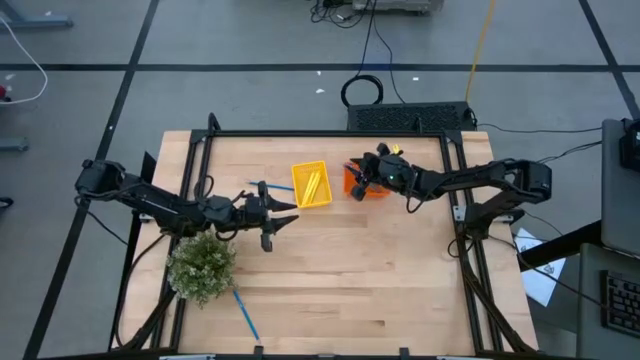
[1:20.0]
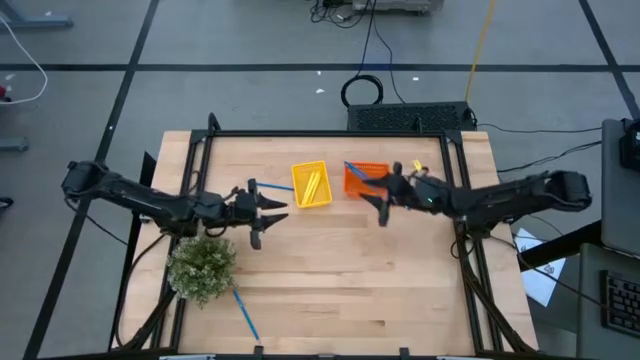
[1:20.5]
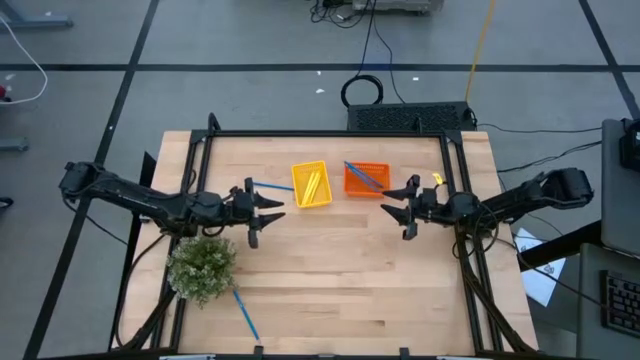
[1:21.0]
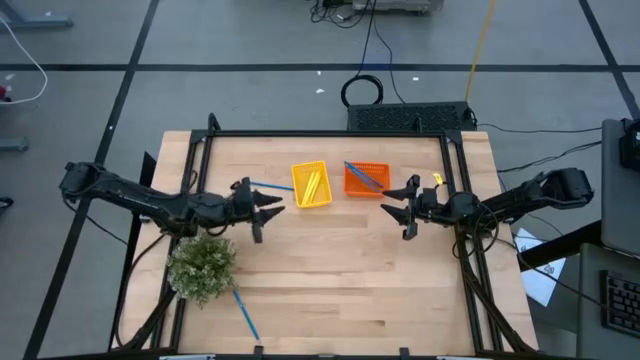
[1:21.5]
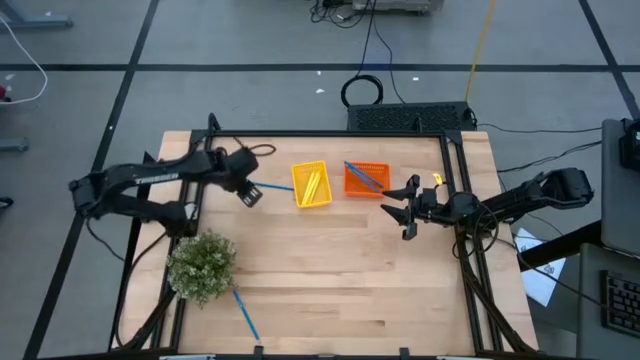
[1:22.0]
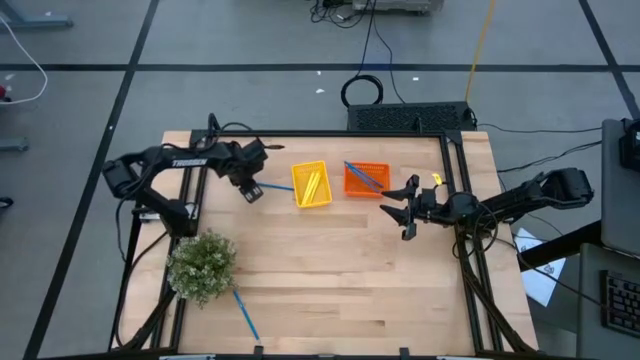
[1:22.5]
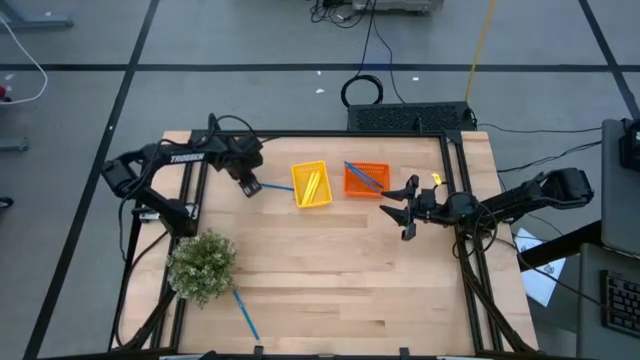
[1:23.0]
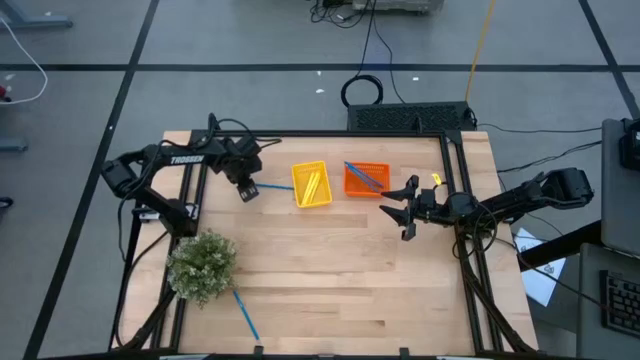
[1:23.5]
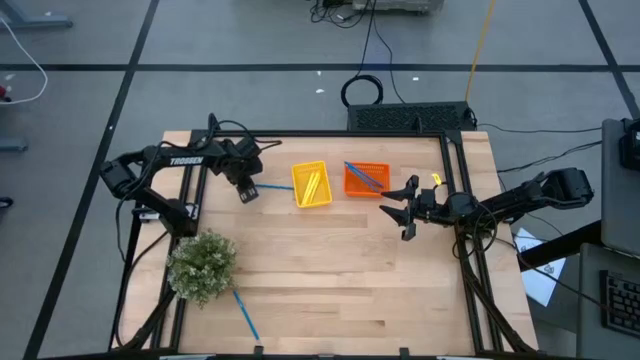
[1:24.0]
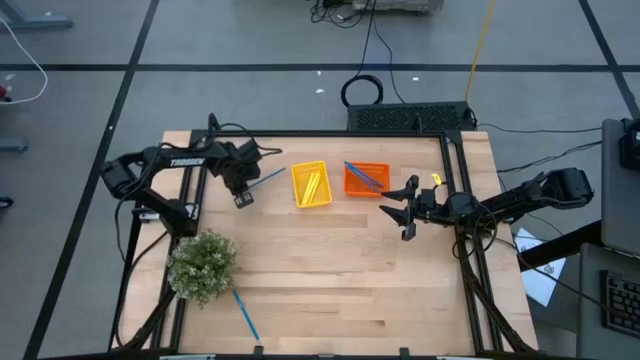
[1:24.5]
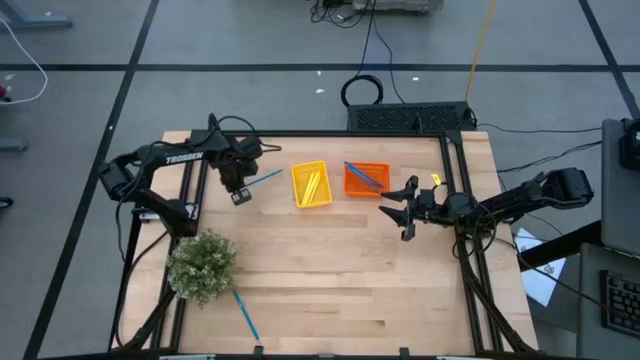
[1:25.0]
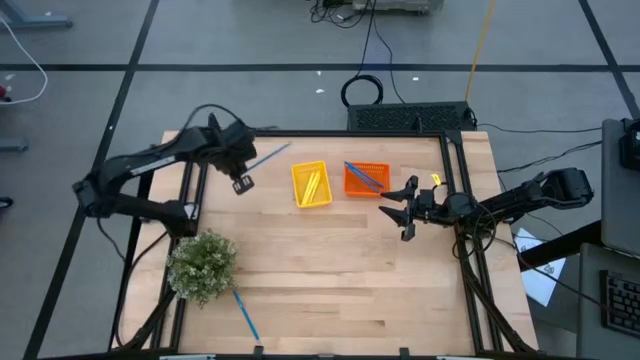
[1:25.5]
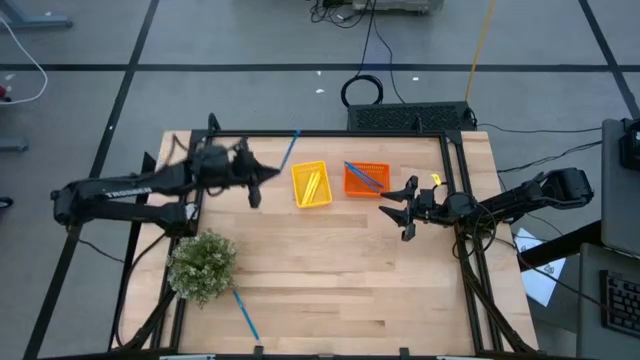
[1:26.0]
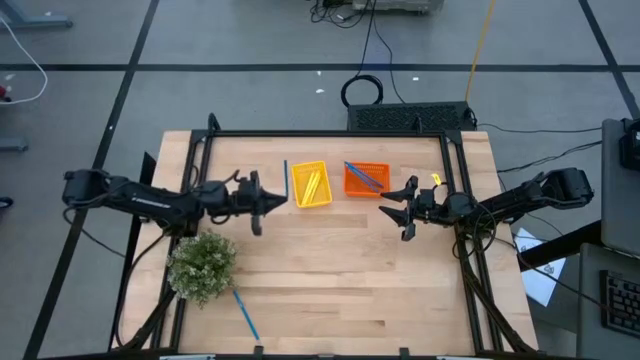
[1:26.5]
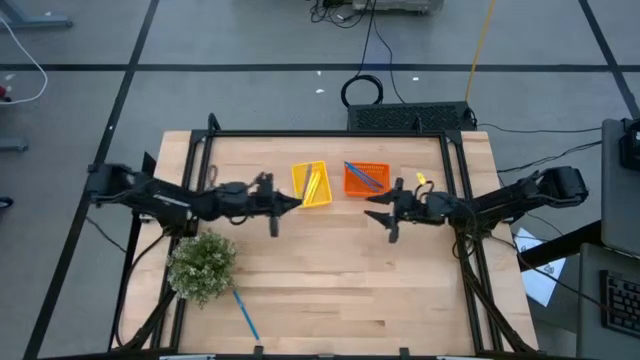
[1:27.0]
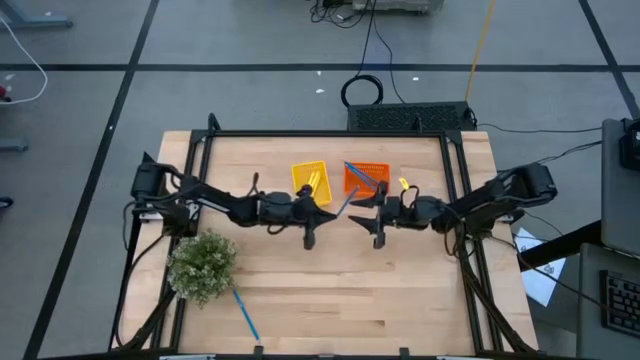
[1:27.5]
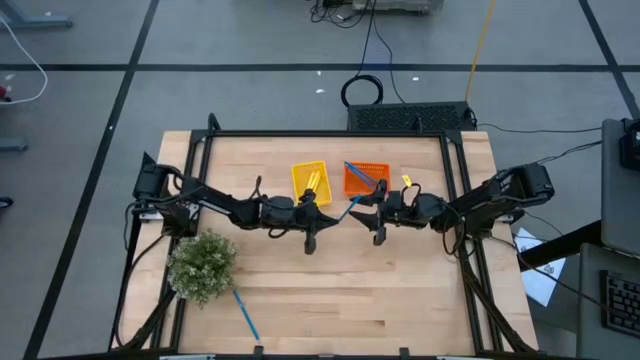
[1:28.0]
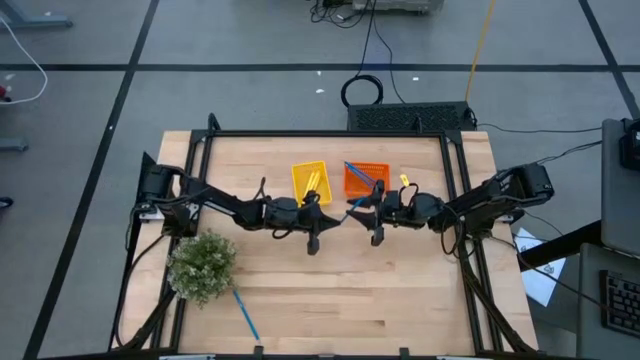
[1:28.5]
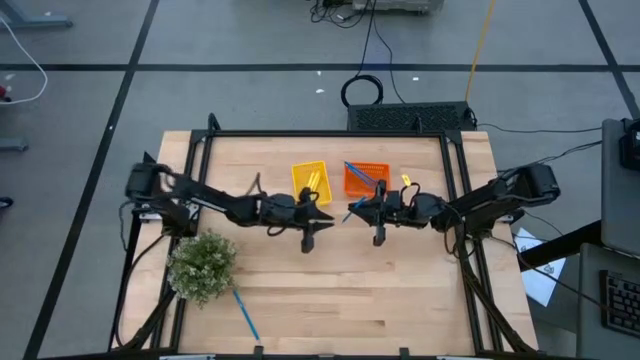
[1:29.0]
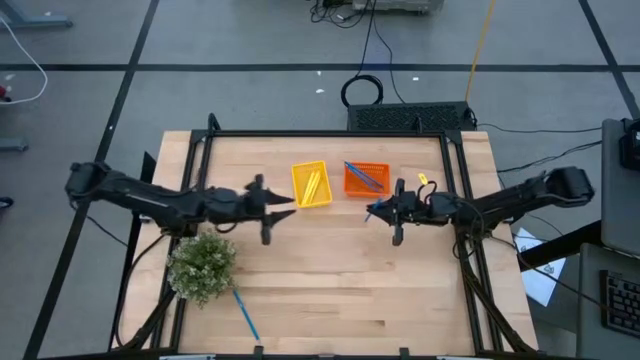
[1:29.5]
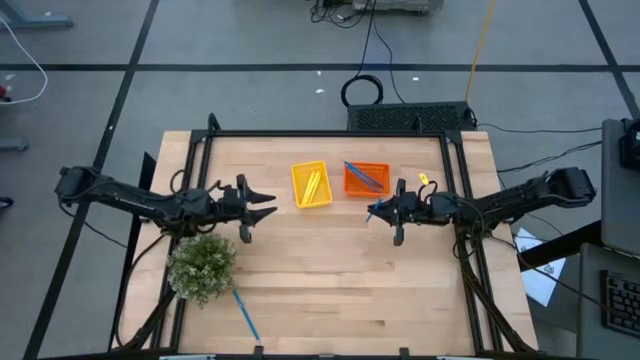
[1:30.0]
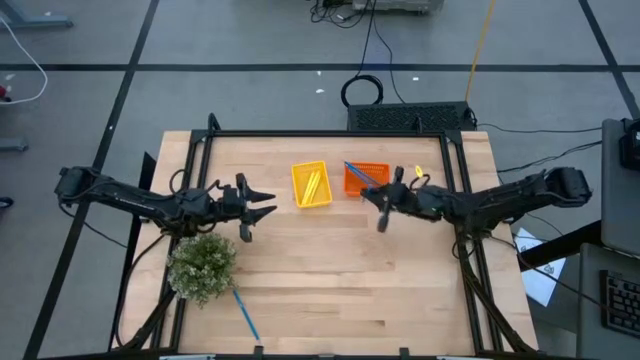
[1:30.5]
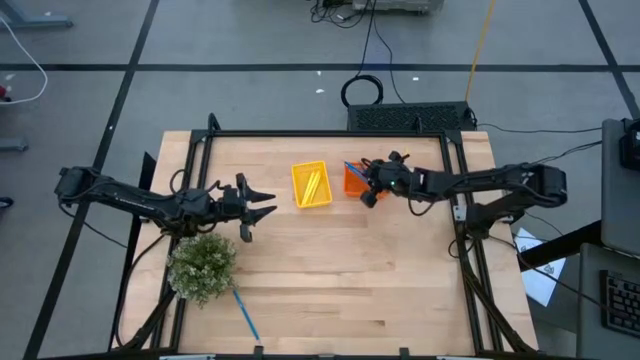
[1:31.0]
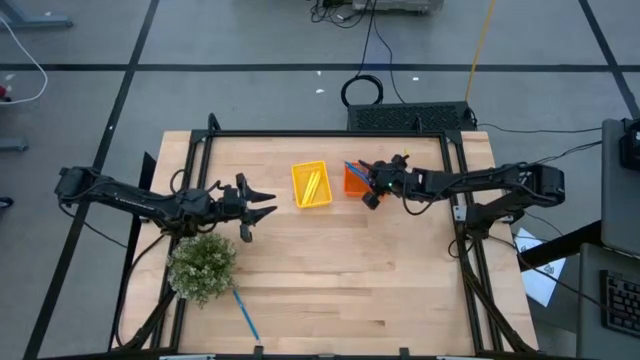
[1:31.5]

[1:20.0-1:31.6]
Task: Sort pens & pencils
Put the top blue pencil into the orange basket

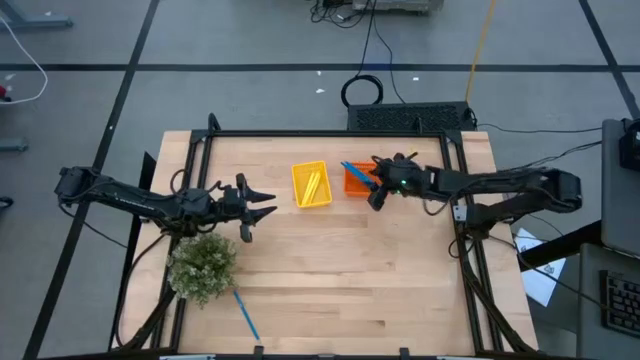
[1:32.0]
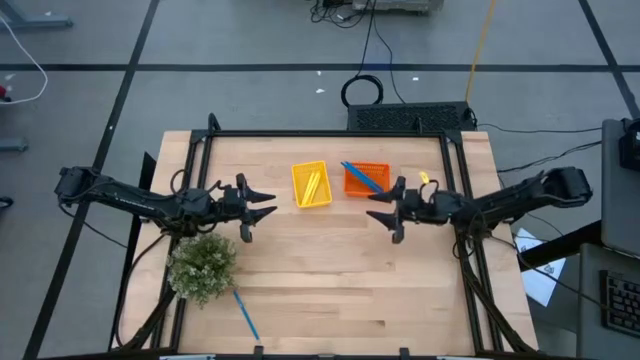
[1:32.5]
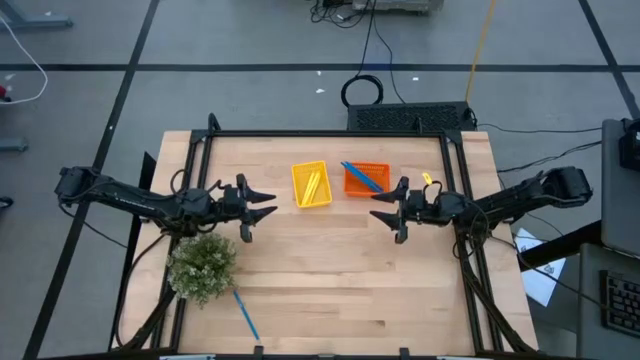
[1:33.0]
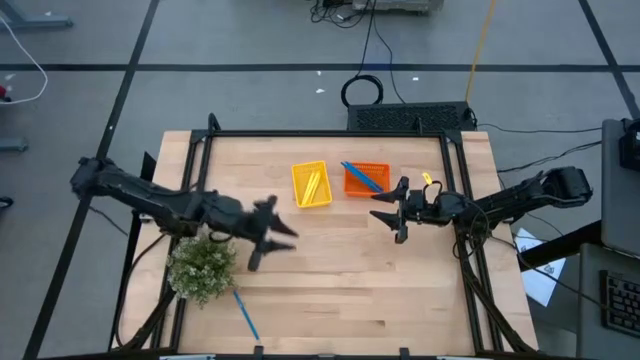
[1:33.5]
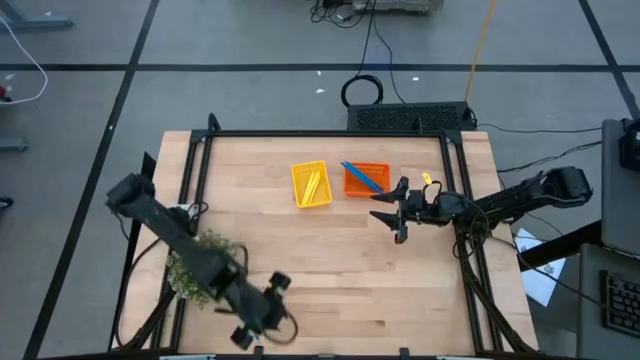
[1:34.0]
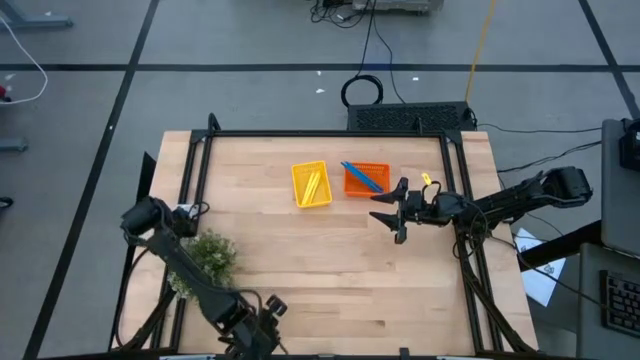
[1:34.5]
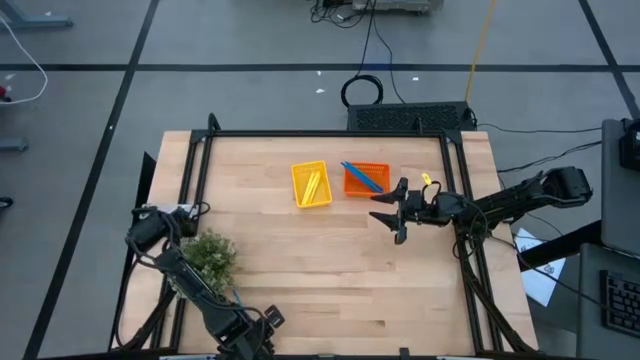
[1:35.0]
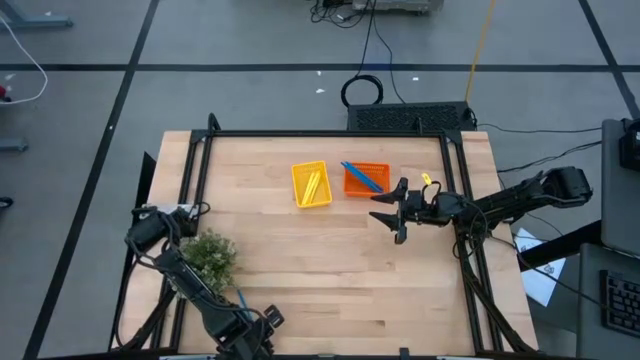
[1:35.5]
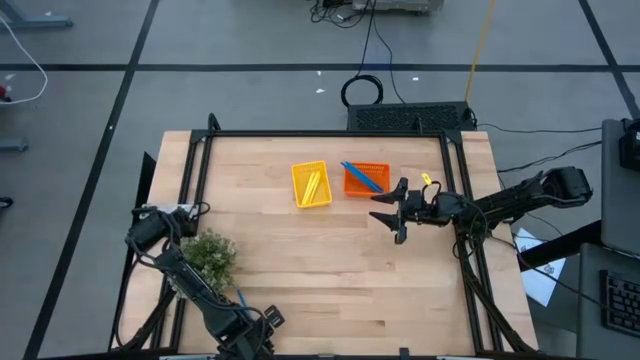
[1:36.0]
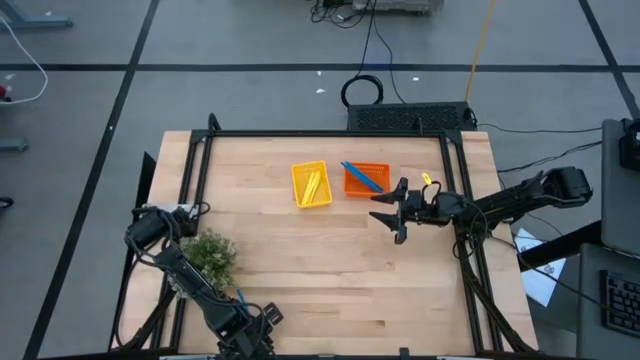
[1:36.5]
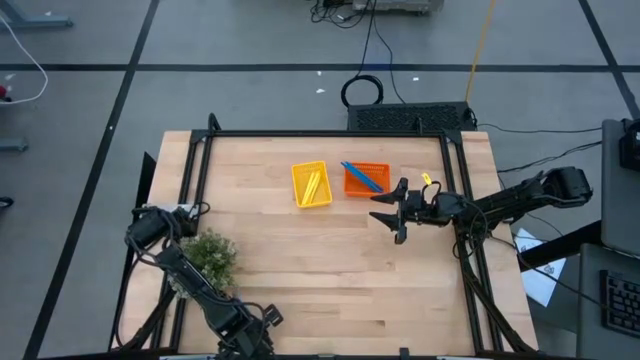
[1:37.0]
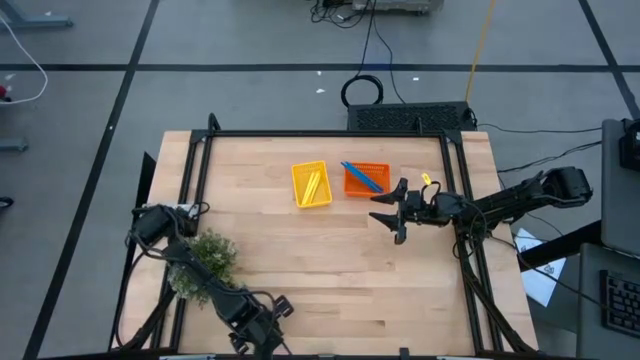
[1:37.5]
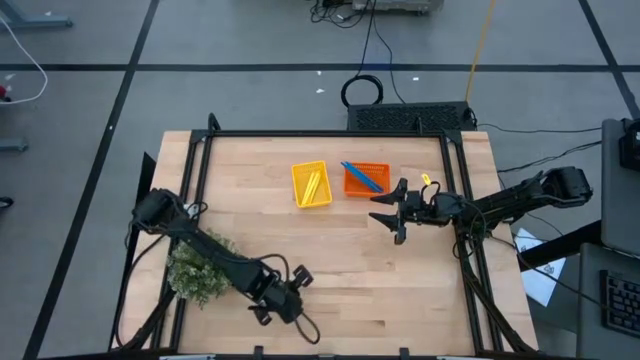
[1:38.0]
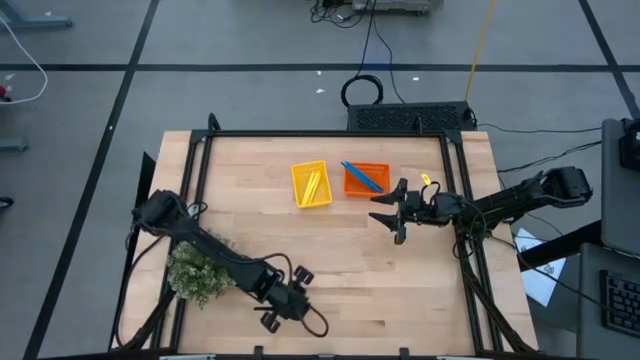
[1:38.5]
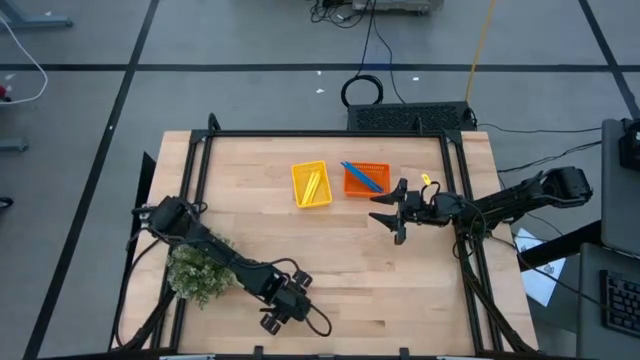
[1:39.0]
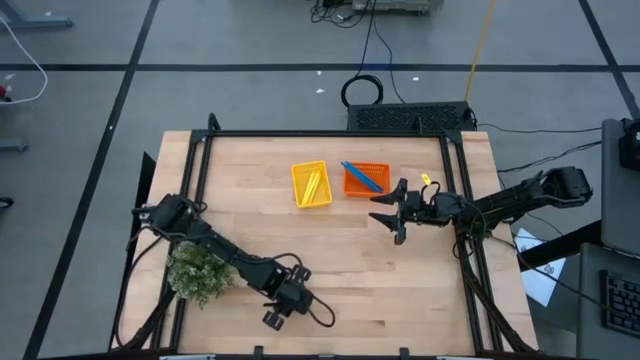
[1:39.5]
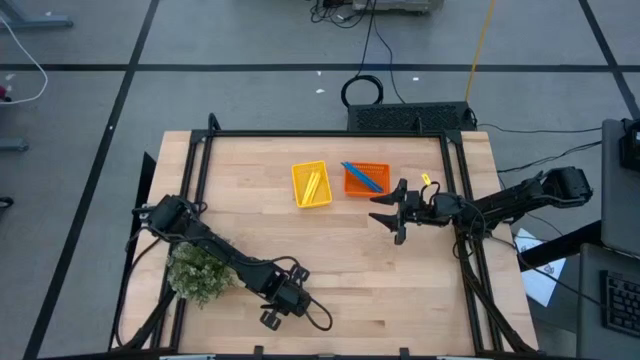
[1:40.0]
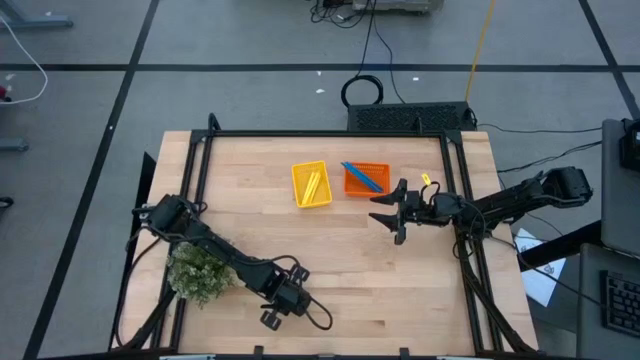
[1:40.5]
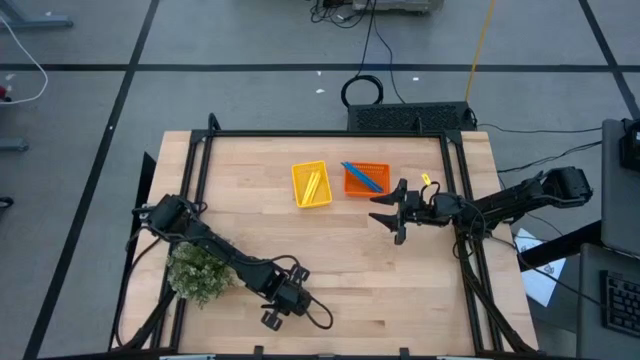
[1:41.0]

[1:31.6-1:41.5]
Put the blue pencil into the orange basket

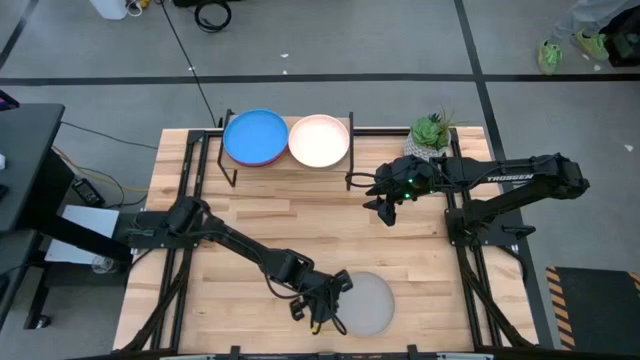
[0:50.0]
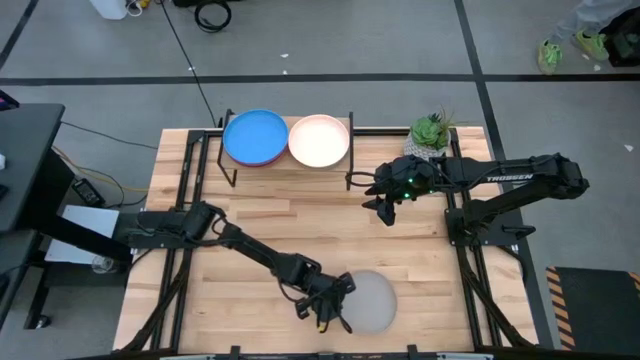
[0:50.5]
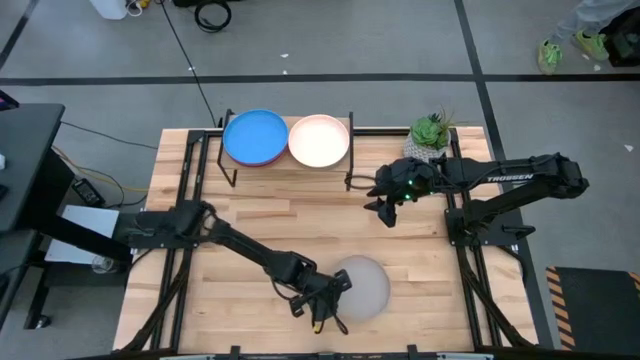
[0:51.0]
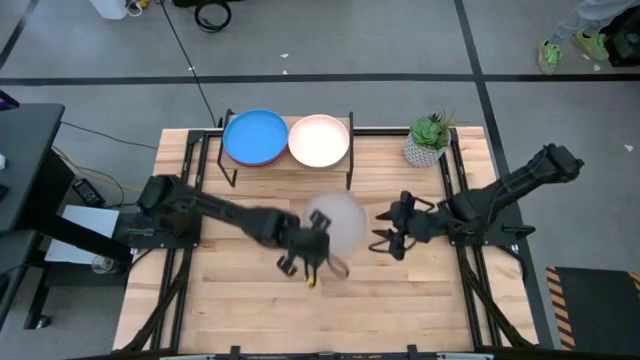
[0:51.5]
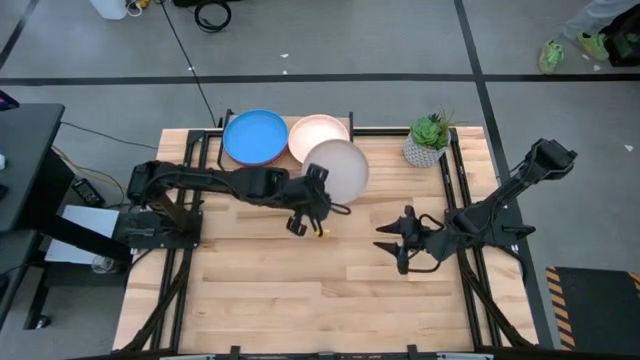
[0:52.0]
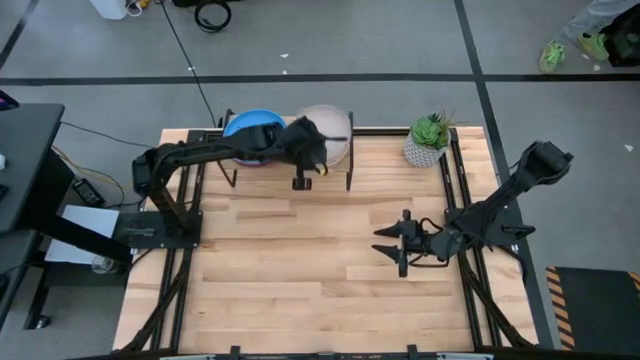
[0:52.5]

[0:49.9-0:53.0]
Task: Place and stack plates onto a shelf
Stack the gray plate on top of the light orange plate on the shelf
